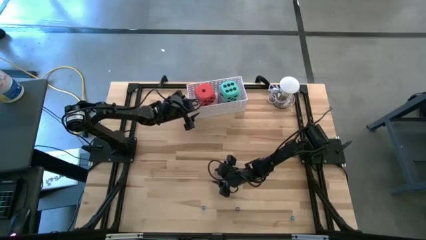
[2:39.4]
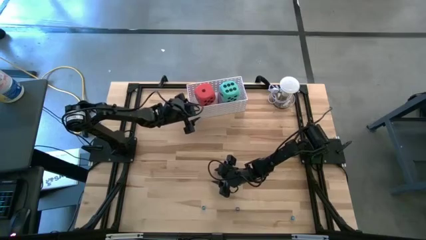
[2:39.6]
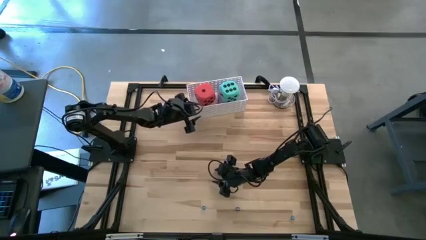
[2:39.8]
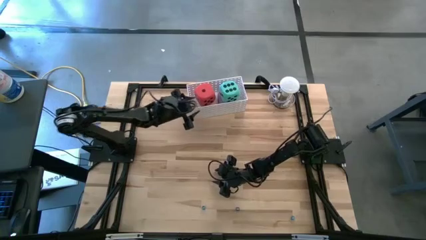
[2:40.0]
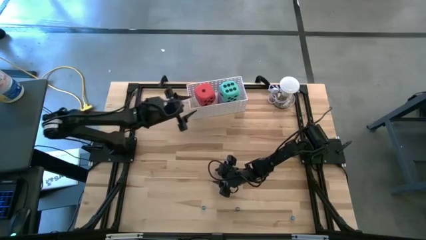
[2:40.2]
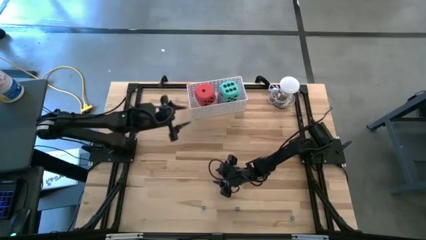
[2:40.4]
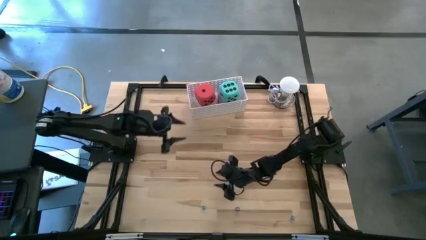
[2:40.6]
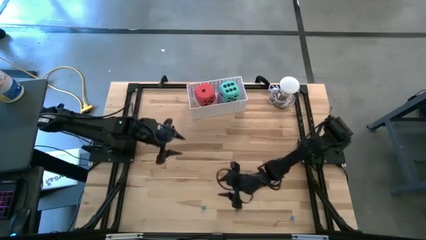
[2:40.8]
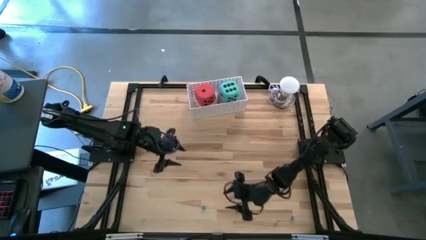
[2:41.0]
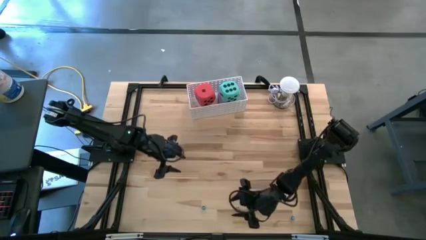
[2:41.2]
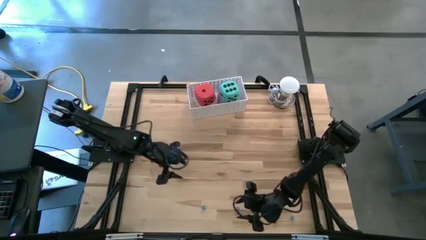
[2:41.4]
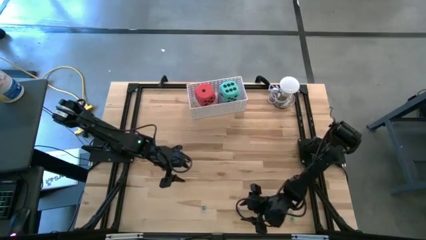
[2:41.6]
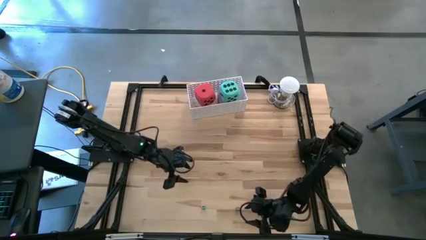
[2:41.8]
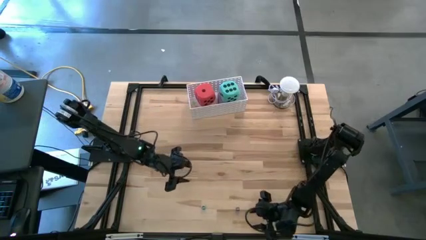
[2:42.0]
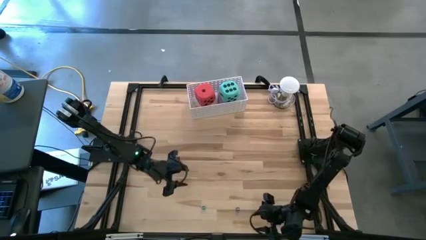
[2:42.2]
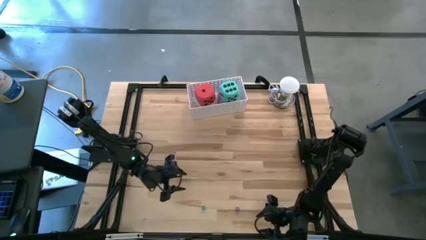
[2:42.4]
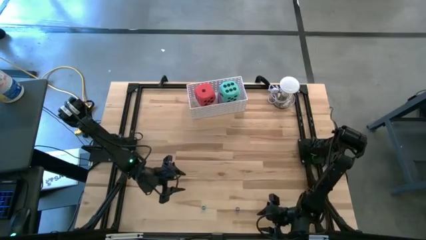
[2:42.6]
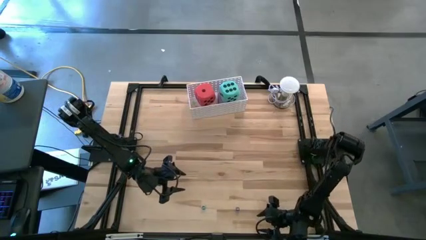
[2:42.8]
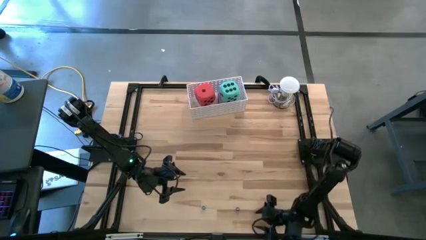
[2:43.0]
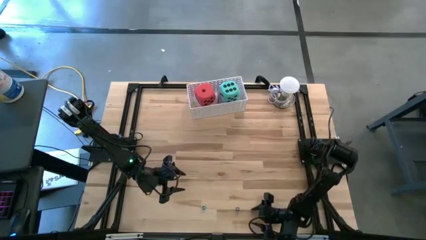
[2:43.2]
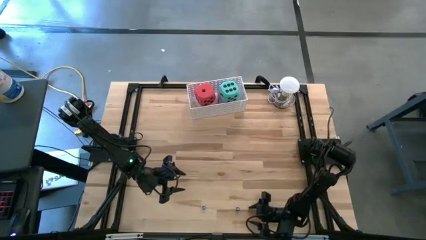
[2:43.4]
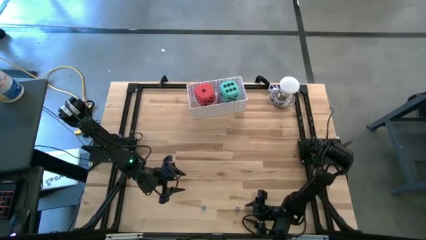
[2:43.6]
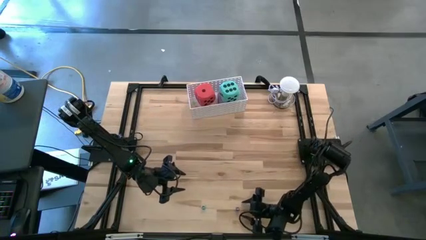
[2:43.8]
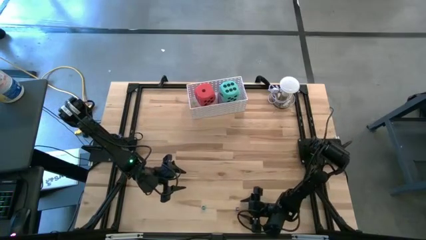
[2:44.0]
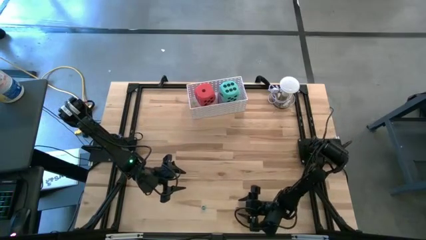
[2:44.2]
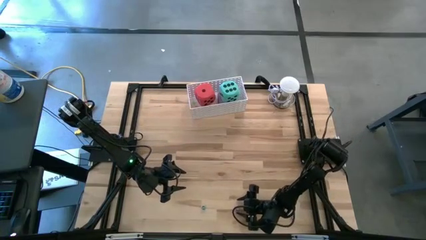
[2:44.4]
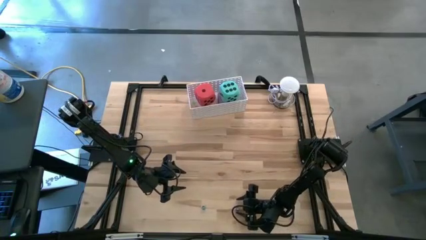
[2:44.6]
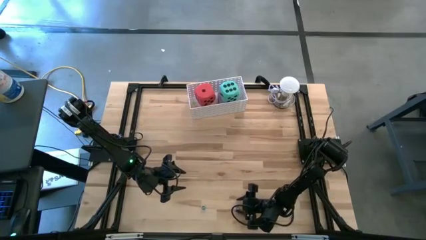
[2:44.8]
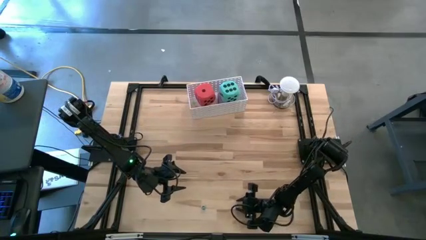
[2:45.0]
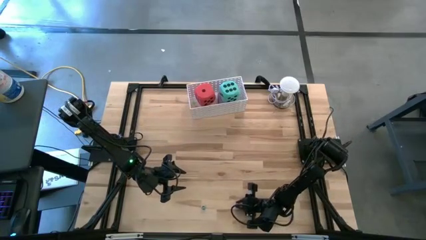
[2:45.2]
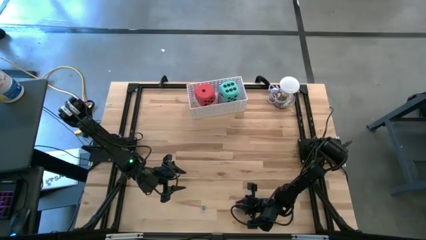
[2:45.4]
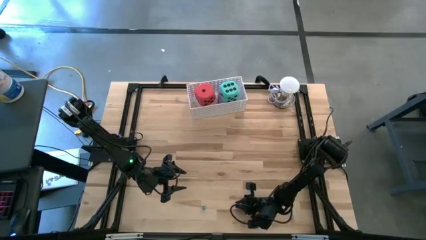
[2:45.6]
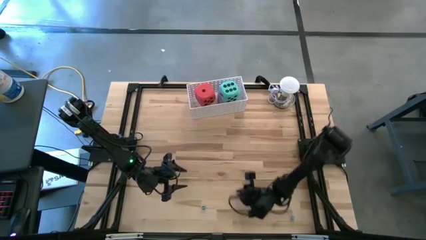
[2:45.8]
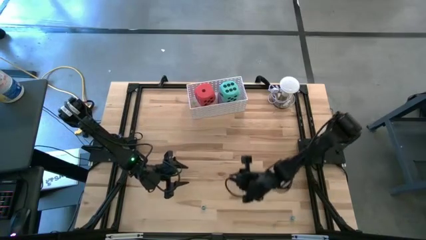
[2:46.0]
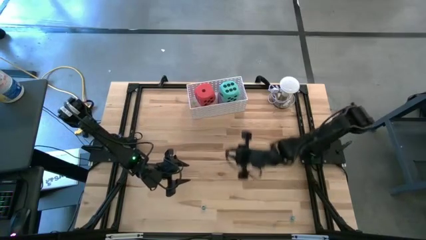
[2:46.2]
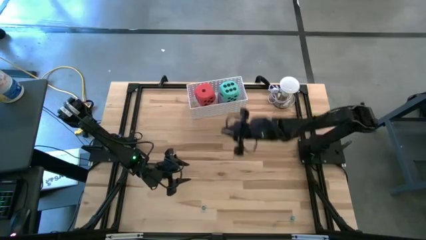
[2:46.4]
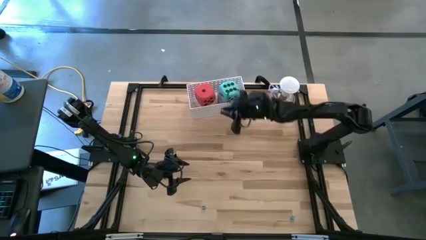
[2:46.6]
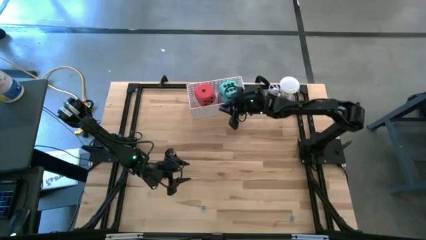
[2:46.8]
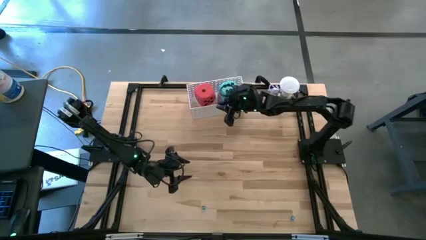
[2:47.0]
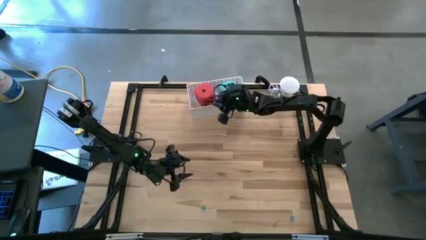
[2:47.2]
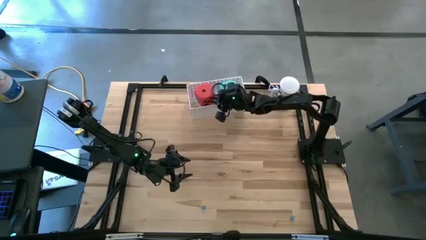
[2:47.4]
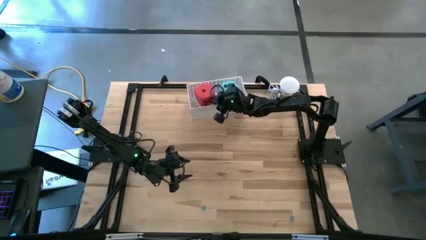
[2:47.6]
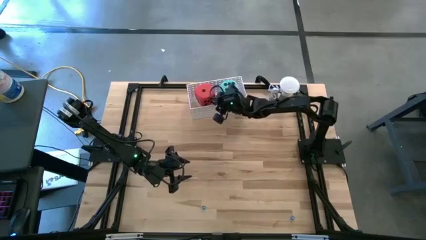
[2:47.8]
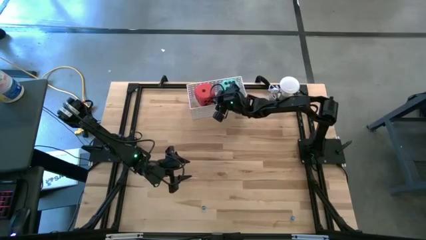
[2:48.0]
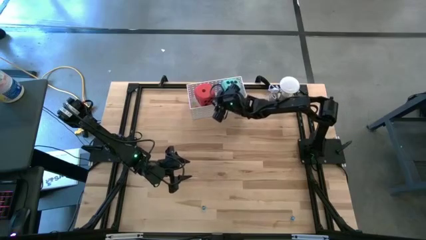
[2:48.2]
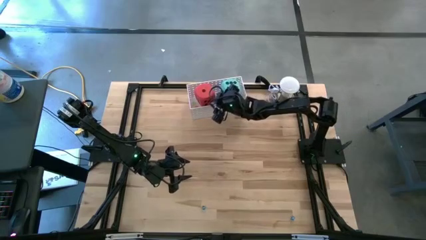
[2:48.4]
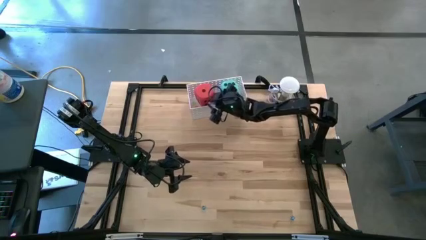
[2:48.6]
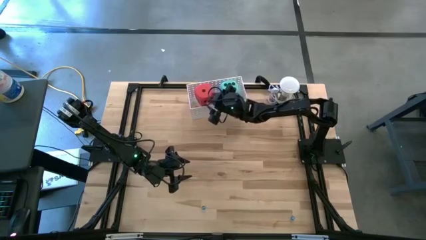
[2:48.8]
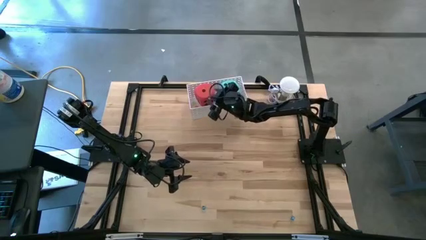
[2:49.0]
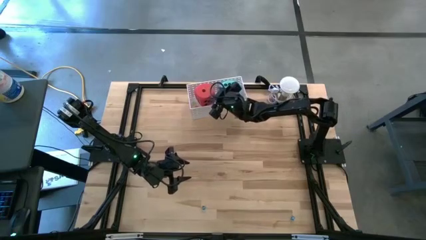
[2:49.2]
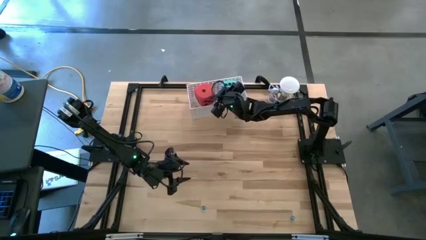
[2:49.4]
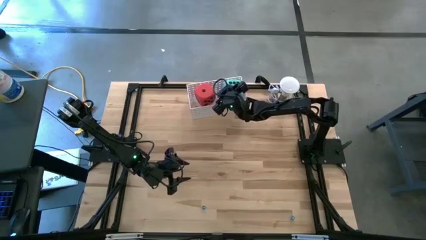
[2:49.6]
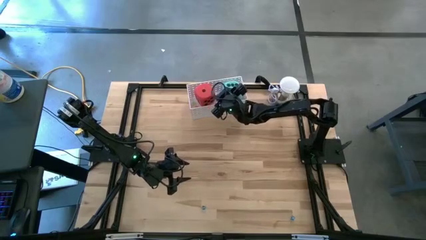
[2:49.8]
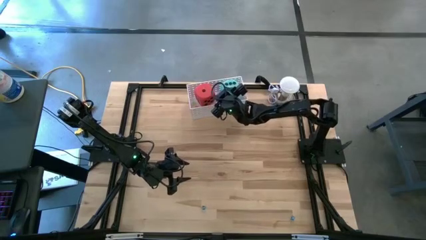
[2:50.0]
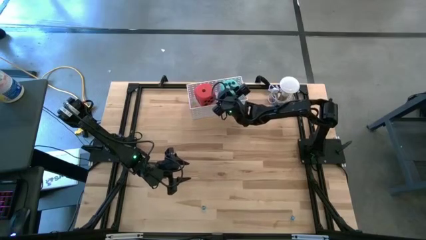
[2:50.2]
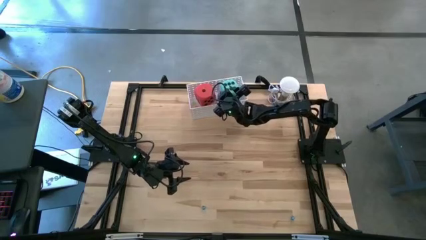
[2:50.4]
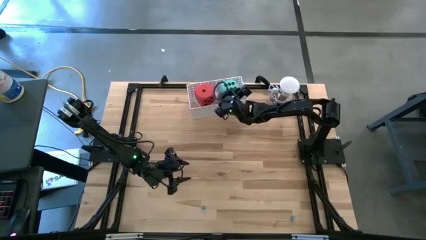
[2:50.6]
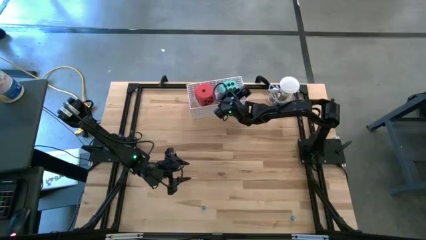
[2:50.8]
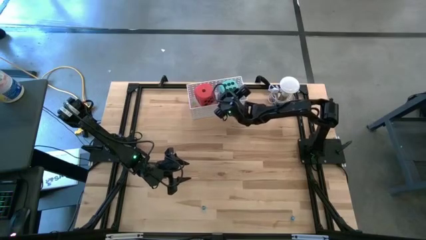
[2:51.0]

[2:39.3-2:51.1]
Task: Pick & Place Dice
Put the small blue dice into the white bin

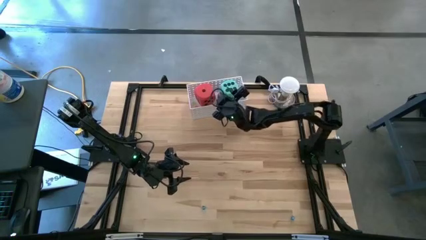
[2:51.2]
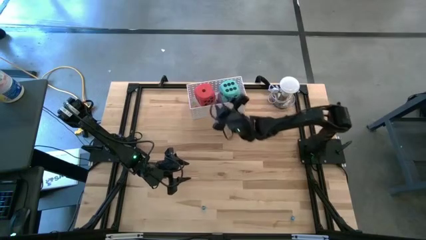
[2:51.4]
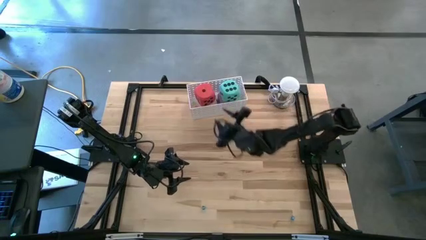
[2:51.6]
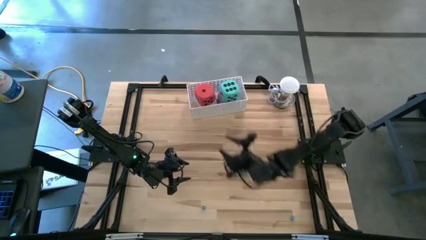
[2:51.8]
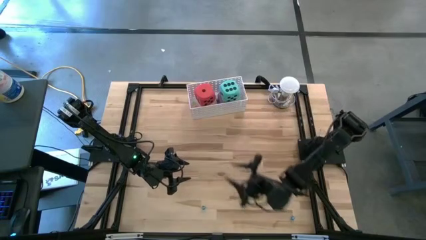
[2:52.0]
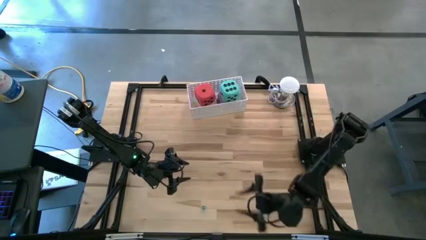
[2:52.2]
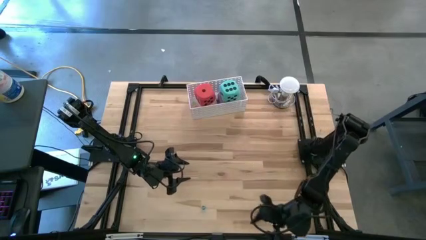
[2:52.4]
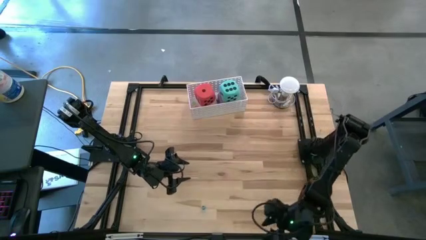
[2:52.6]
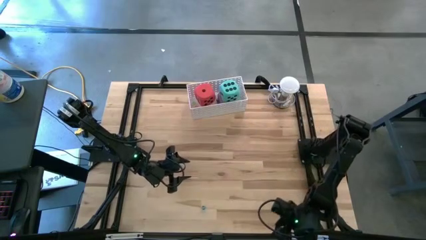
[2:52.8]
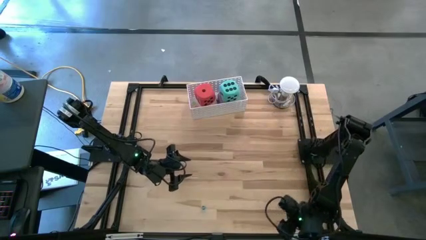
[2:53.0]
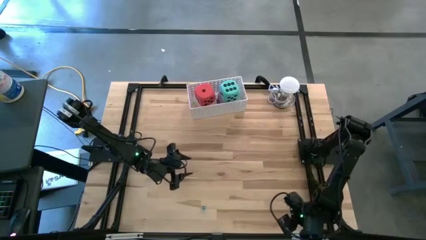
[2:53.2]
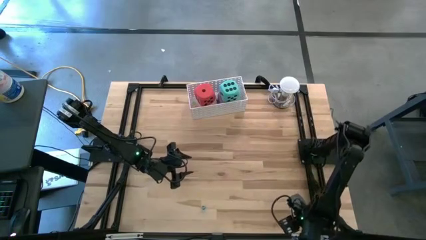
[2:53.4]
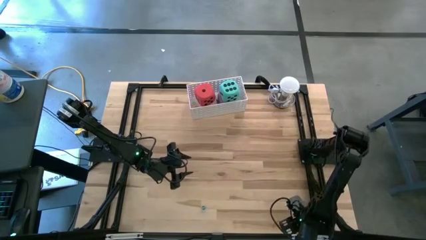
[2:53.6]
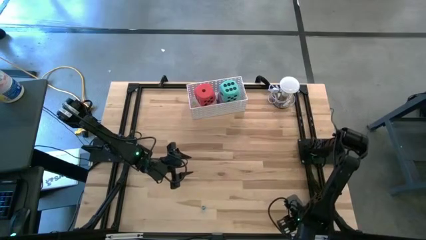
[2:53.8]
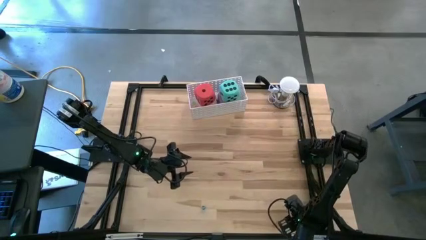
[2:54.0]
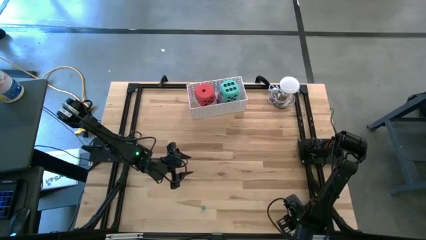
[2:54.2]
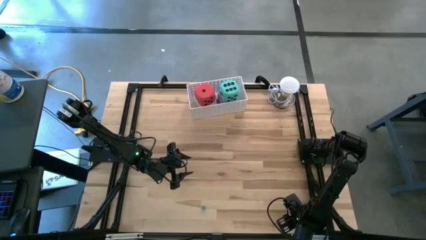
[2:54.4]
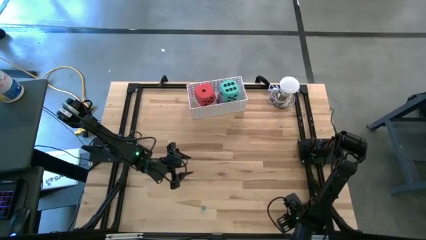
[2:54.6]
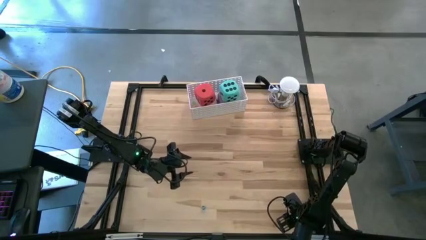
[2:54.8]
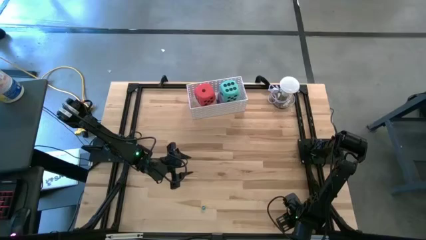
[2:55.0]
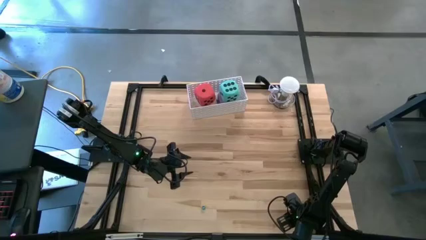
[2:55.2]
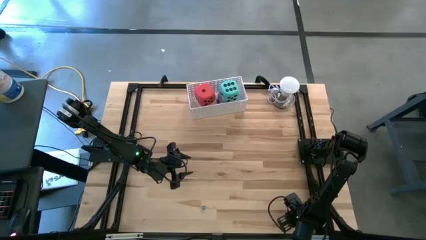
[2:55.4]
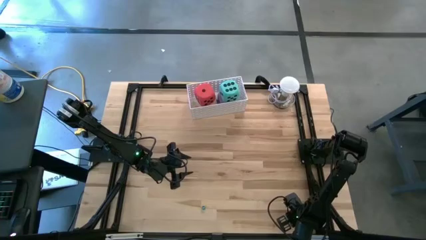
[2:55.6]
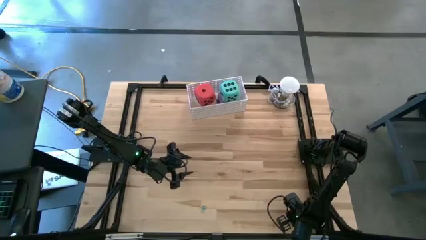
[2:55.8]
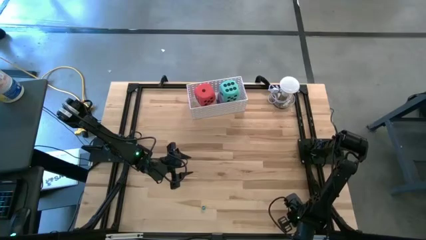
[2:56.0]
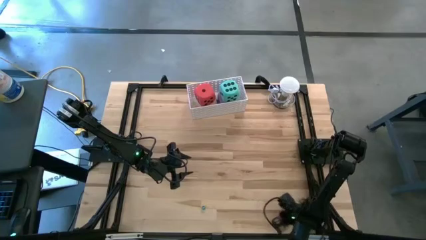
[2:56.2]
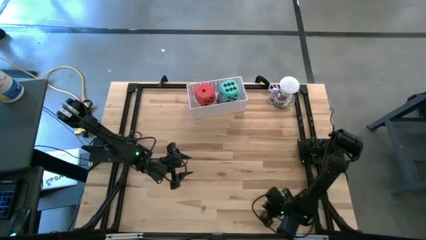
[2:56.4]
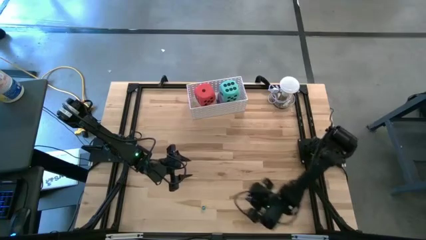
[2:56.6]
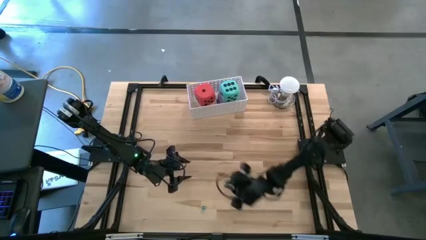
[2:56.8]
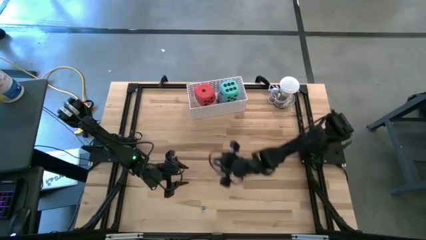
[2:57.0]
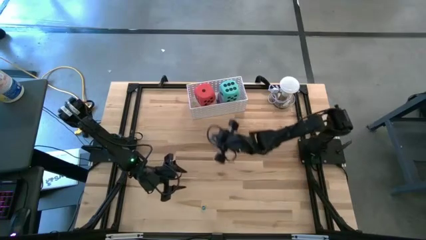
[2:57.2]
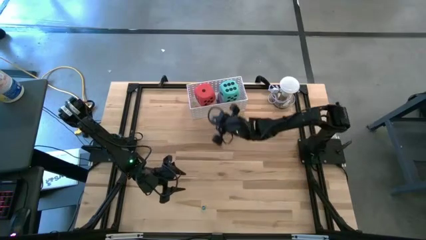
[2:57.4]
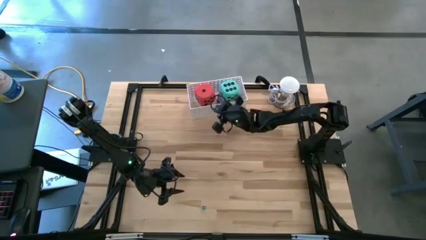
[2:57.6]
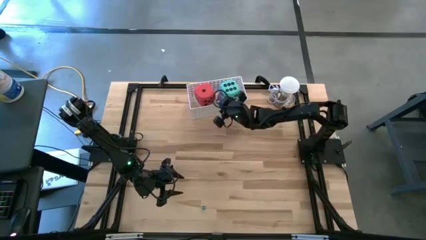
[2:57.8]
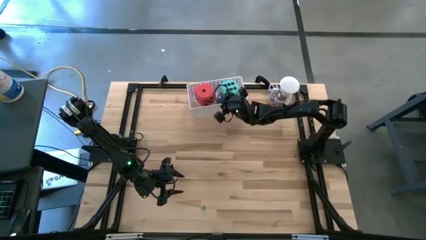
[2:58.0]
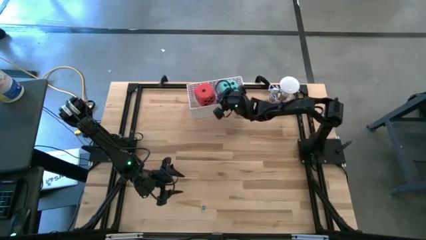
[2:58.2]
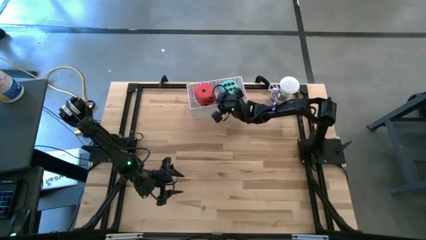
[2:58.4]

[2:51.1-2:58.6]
Put the right small light blue dice into the white bin
